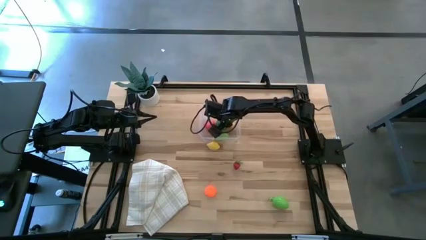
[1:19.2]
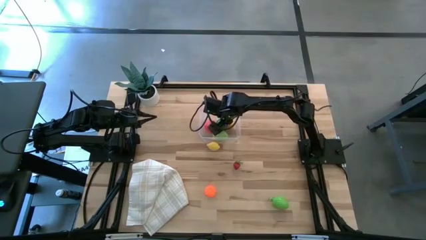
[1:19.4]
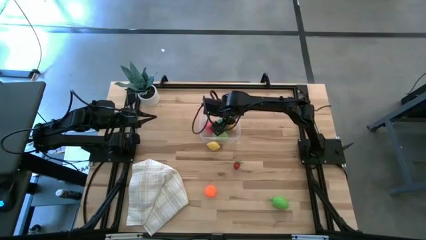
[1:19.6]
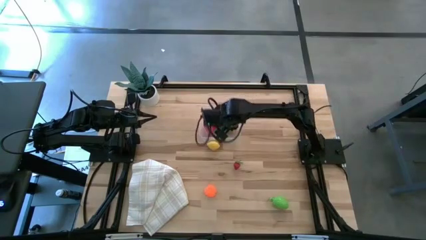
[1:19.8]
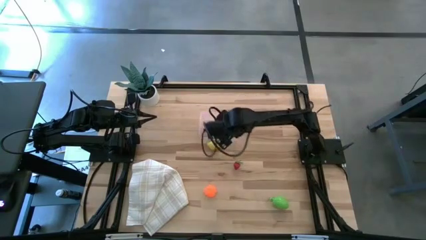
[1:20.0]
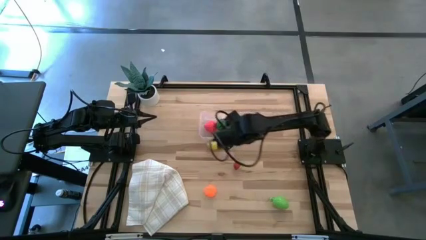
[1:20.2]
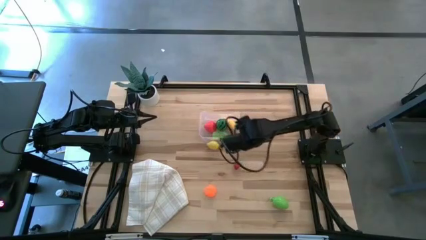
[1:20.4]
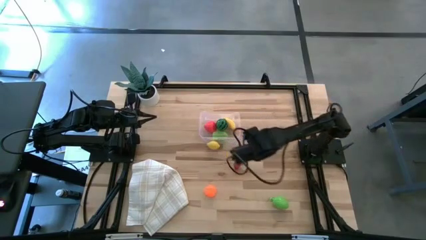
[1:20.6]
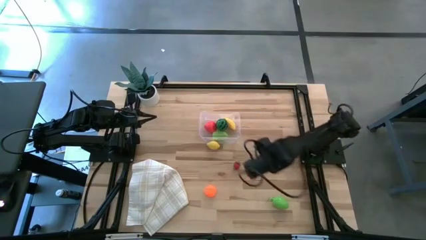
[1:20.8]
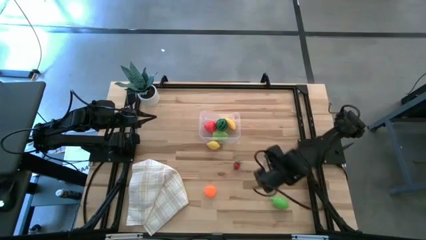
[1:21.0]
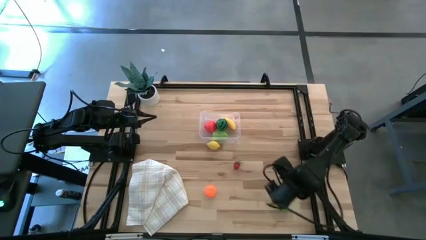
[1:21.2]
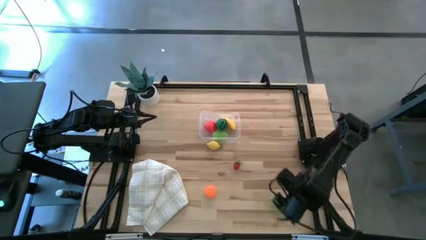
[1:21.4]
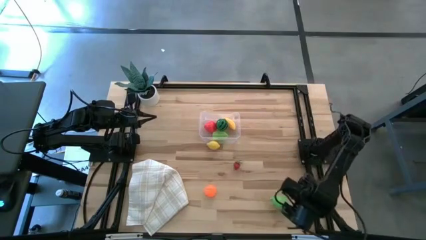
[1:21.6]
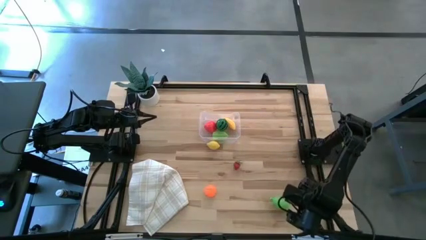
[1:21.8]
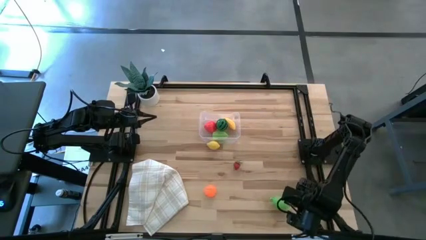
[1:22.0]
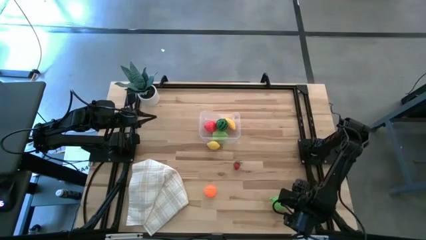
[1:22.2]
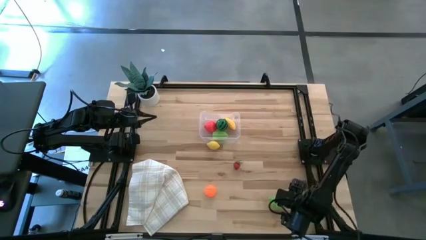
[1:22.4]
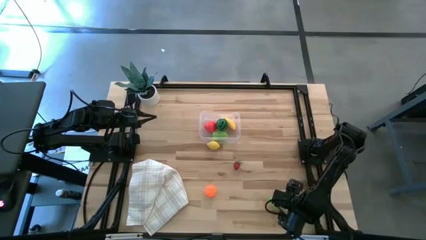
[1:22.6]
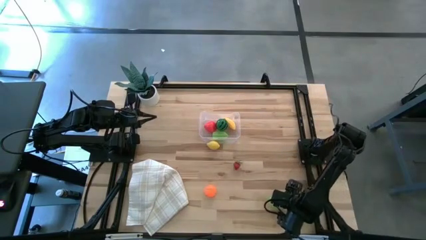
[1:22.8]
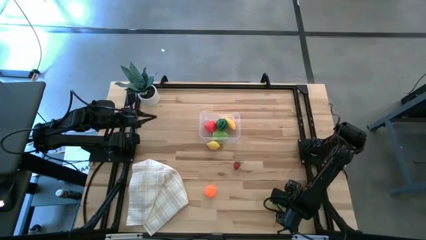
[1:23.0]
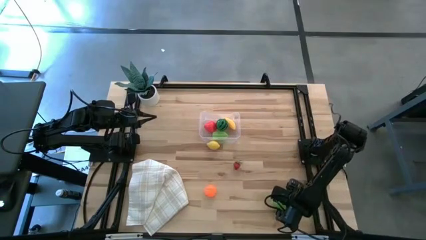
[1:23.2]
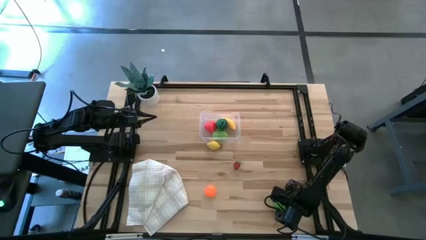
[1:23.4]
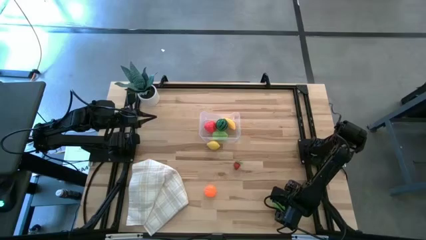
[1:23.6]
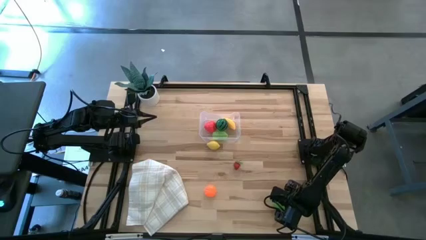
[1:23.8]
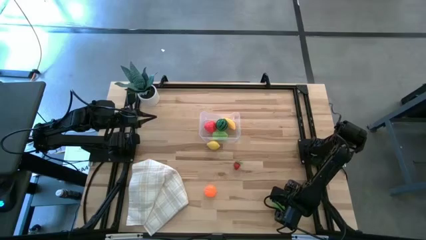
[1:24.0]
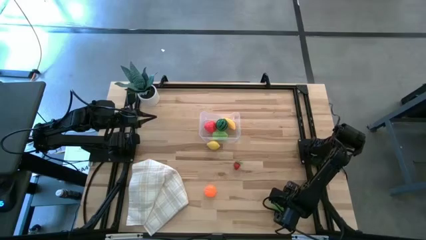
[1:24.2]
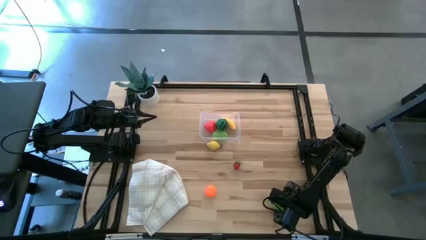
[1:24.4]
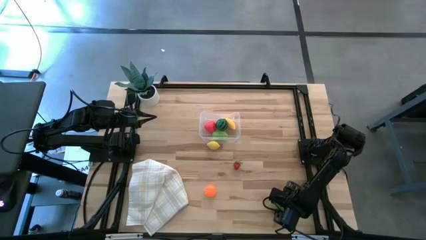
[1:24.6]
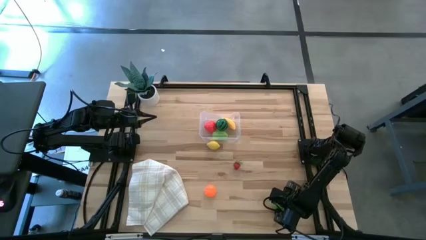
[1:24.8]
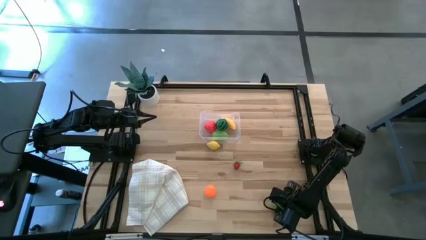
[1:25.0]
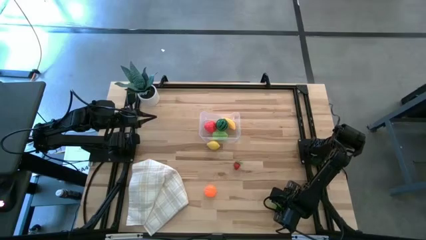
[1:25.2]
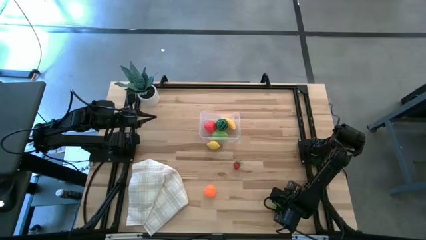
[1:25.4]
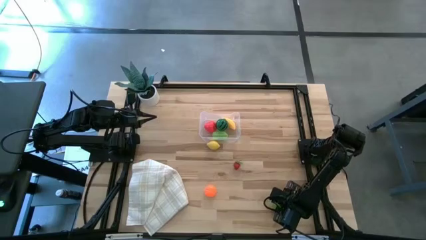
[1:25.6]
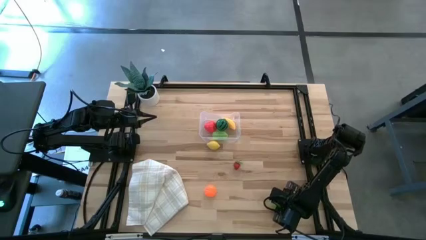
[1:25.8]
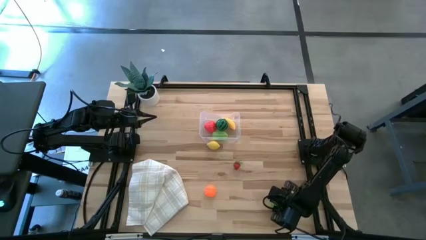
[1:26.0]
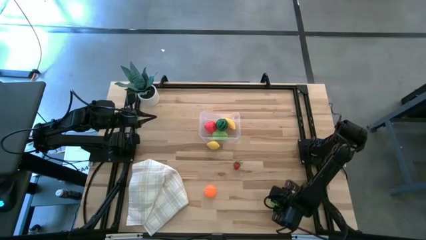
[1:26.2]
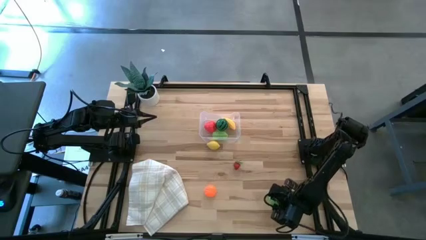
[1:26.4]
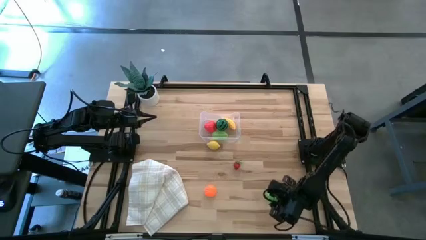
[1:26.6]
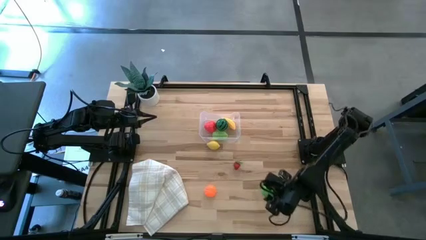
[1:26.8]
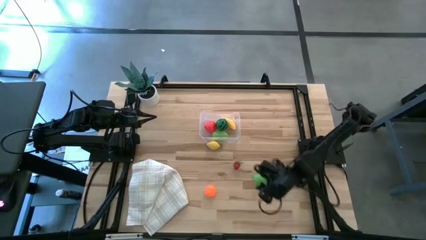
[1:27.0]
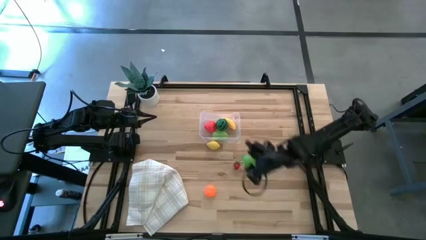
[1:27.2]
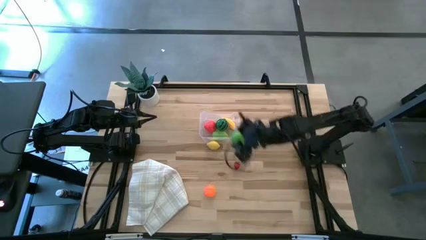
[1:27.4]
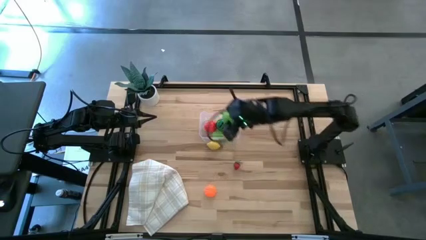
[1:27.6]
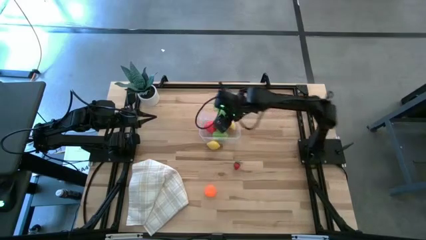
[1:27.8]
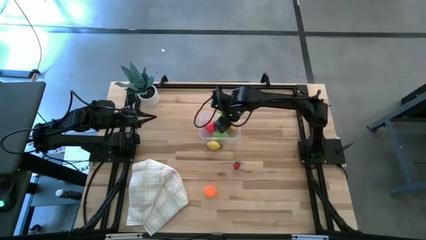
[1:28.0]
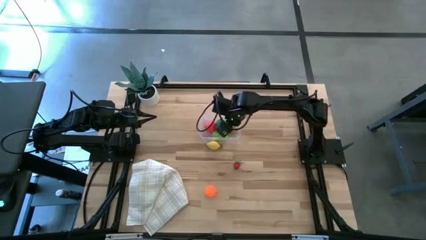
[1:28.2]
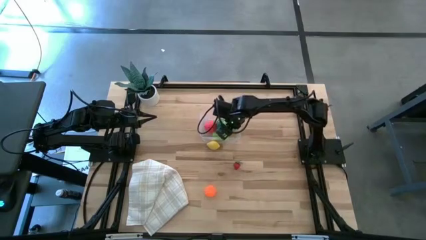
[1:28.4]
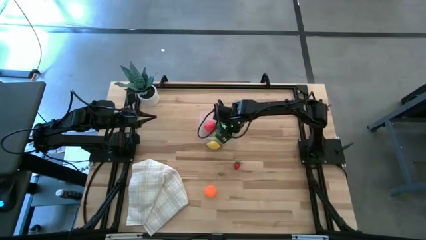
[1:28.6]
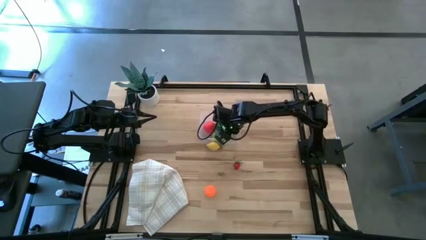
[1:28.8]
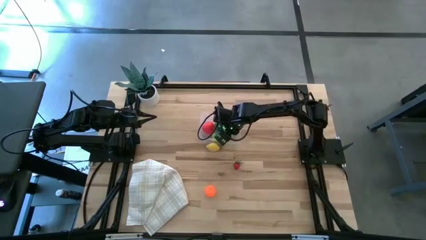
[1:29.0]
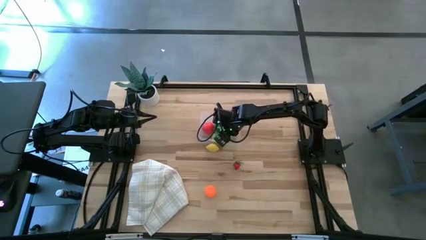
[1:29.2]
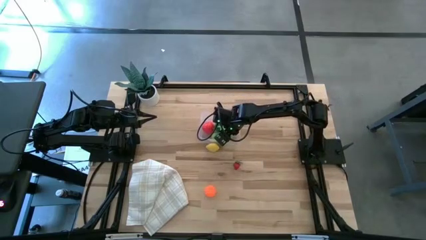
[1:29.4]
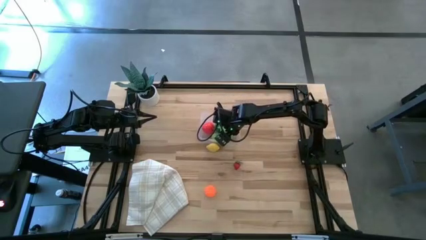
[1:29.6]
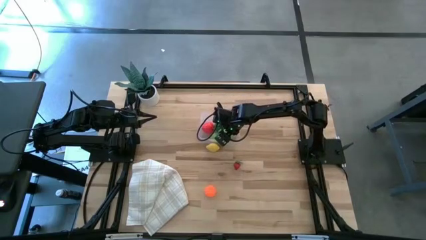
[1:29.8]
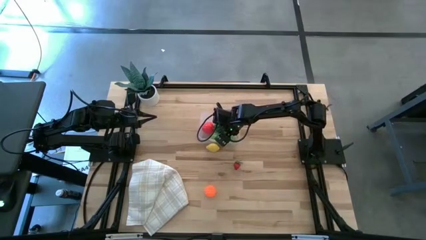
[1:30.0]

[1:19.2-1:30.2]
Task: Pick and placing Produce into tupperware
Put the melon into the transparent bin

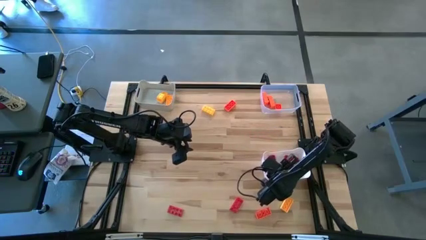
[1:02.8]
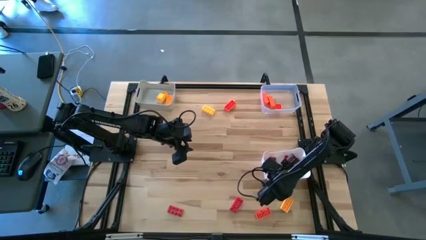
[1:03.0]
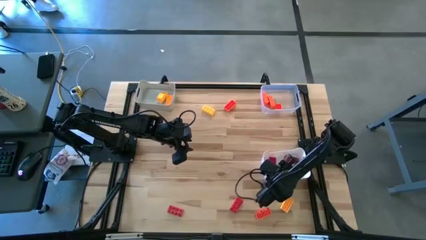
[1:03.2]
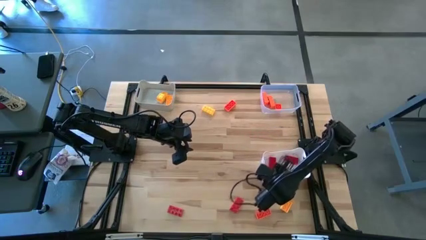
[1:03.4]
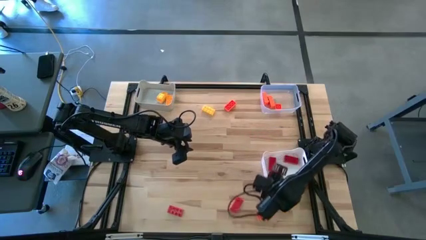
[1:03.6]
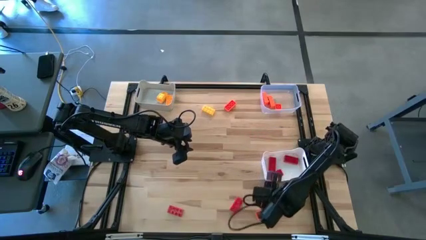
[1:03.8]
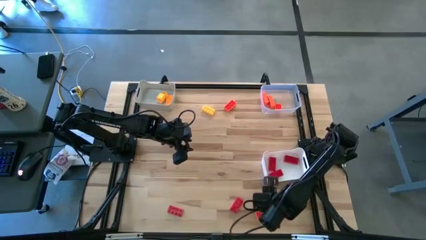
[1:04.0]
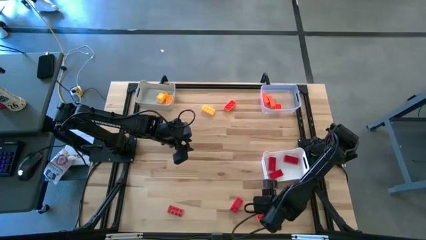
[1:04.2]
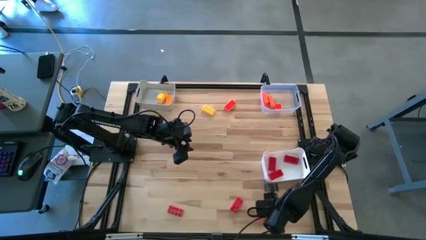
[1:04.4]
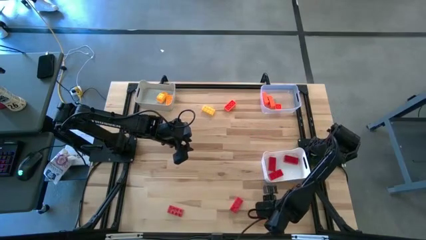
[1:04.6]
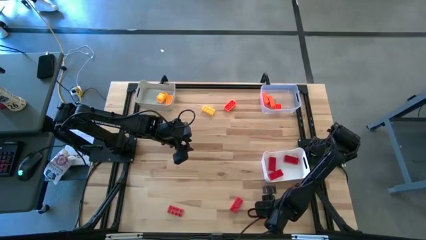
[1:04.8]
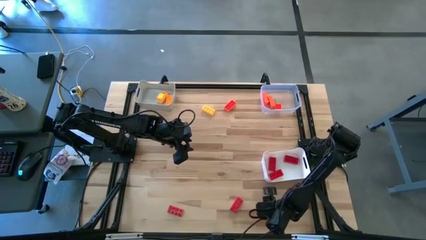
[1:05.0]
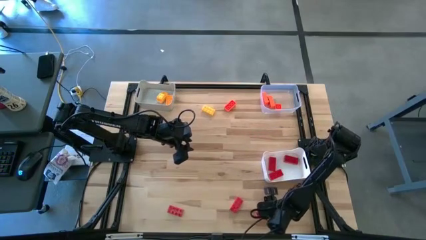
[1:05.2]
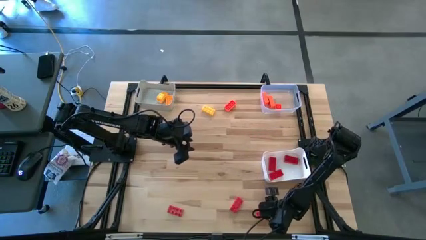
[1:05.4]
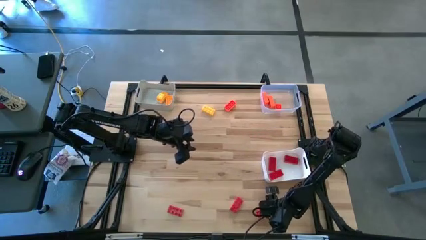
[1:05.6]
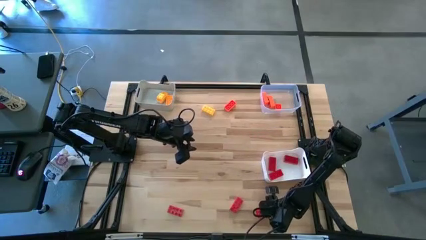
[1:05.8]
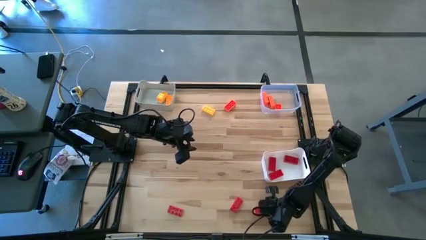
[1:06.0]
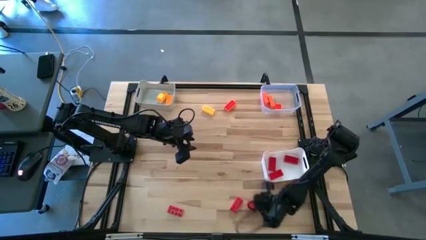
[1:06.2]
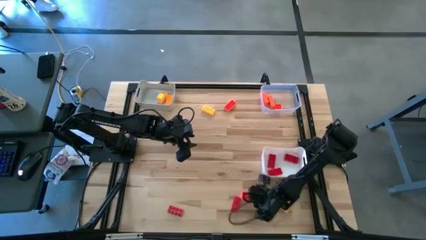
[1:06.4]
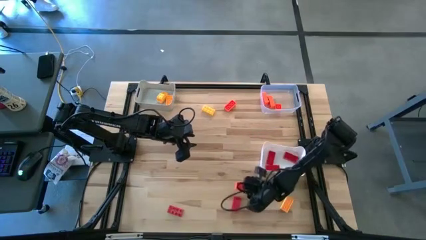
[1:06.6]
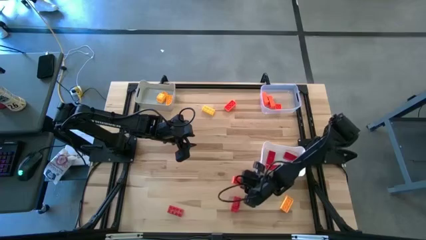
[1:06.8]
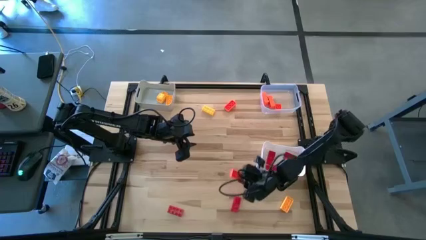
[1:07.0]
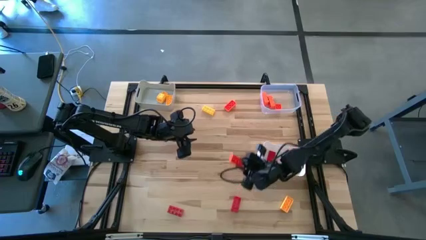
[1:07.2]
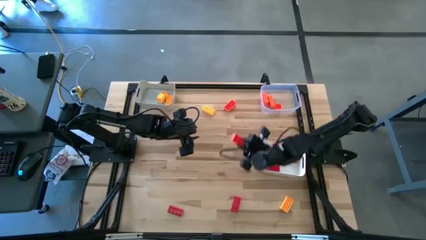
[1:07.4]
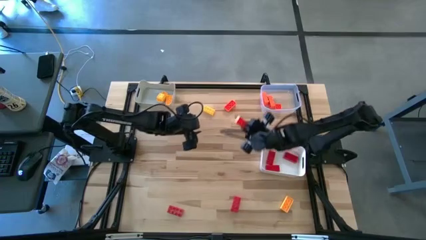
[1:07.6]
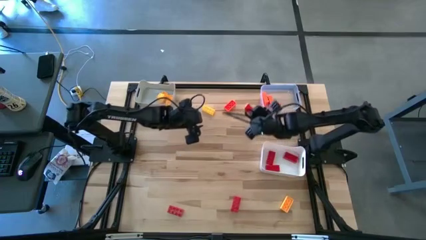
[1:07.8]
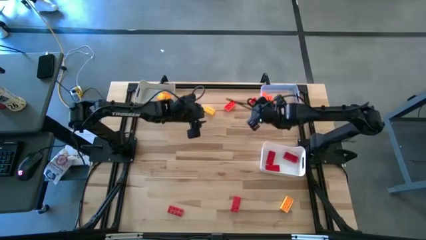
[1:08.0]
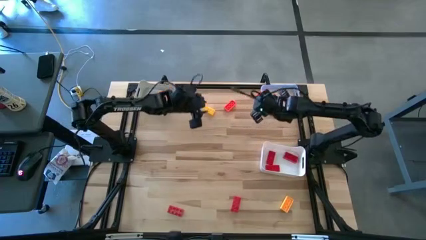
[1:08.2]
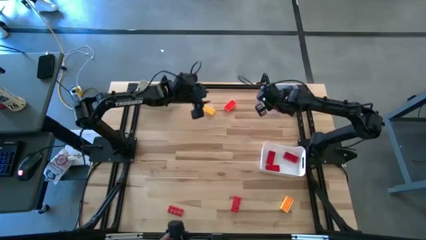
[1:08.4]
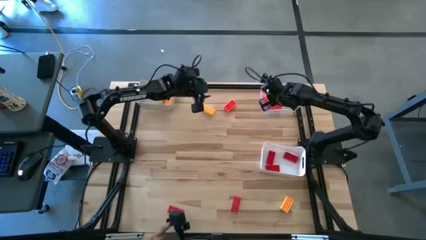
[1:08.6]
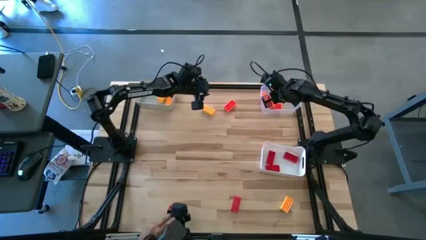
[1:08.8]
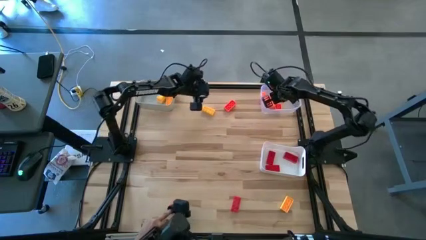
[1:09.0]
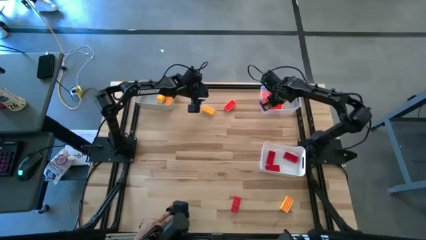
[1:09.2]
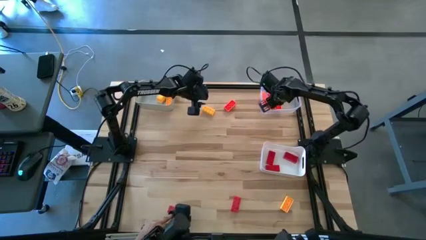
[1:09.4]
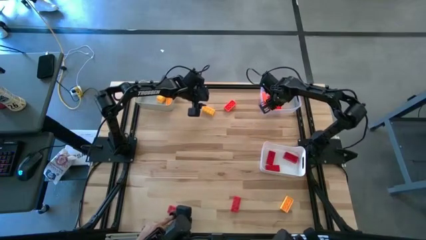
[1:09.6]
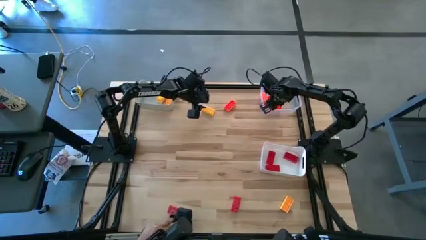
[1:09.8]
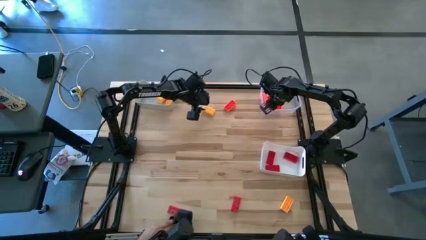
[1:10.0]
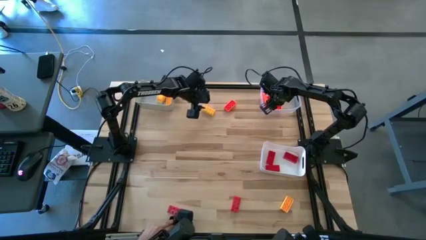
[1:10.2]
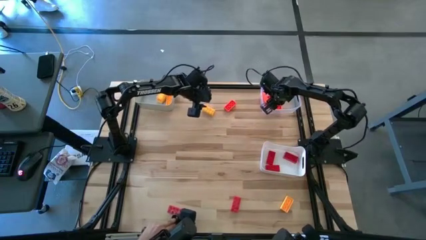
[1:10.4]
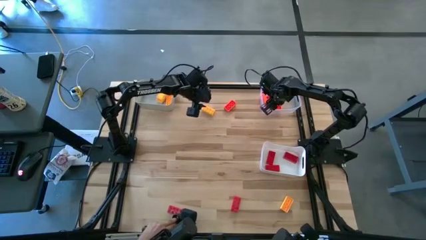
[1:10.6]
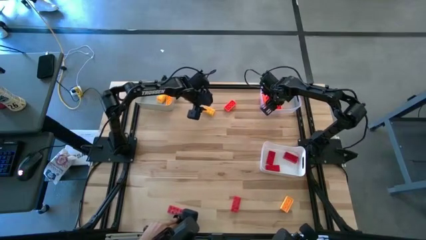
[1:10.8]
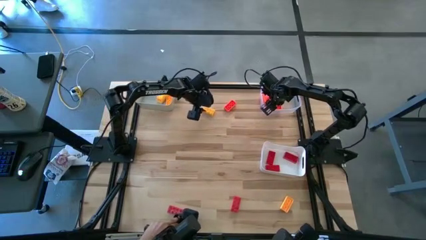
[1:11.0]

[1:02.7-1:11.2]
Task: Sort & place blocks by color
Put the orange block into the transparent bin
